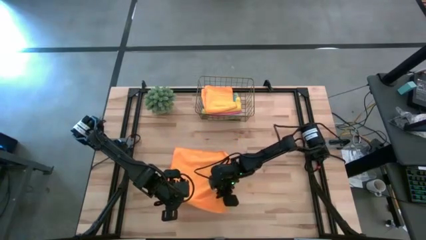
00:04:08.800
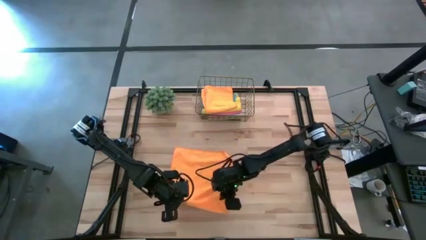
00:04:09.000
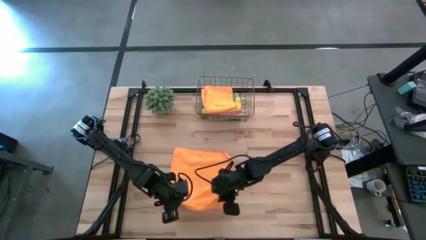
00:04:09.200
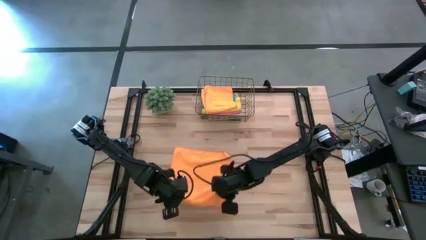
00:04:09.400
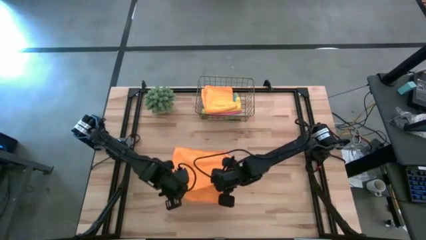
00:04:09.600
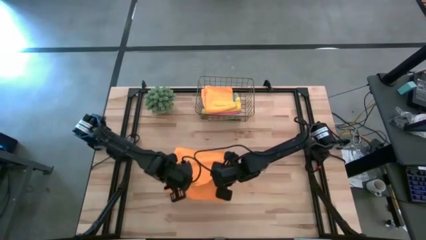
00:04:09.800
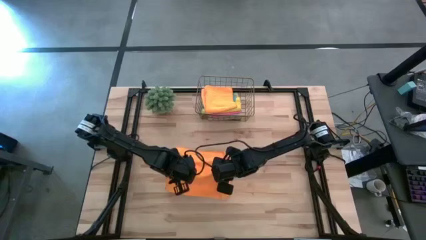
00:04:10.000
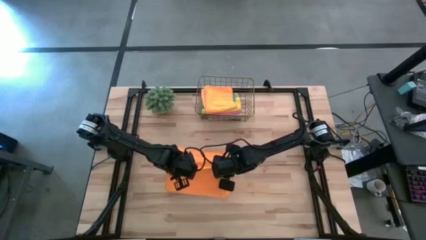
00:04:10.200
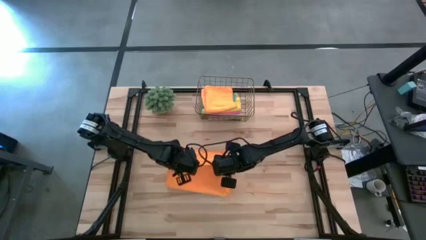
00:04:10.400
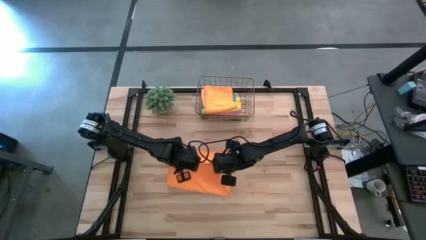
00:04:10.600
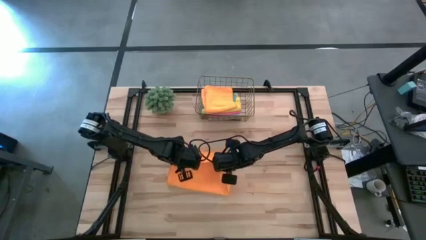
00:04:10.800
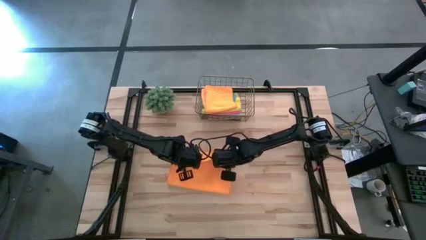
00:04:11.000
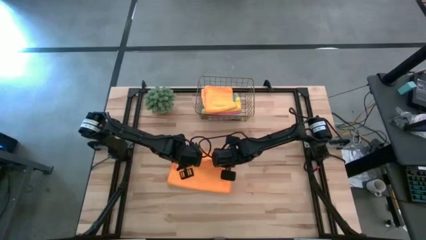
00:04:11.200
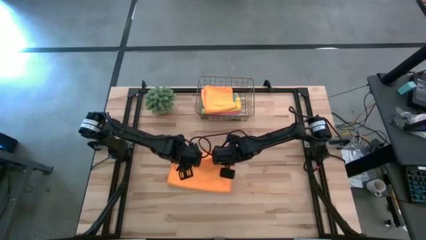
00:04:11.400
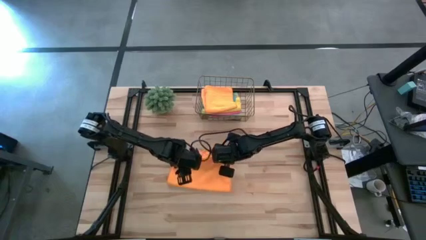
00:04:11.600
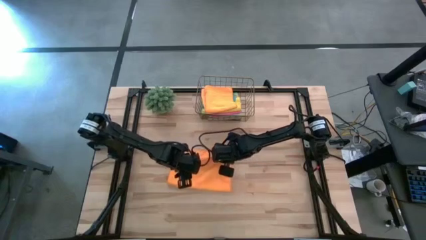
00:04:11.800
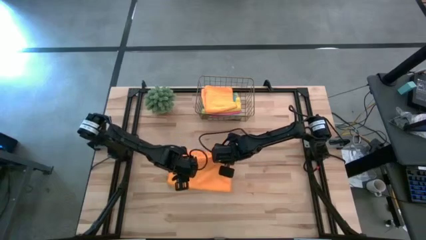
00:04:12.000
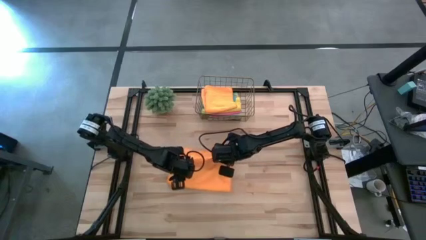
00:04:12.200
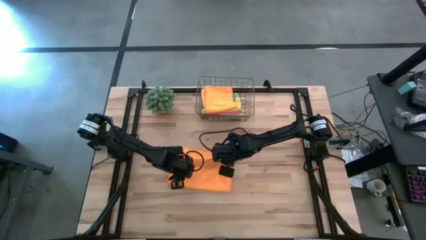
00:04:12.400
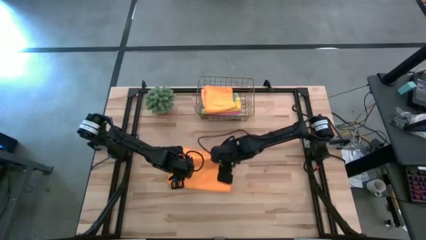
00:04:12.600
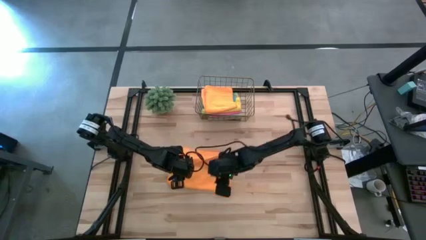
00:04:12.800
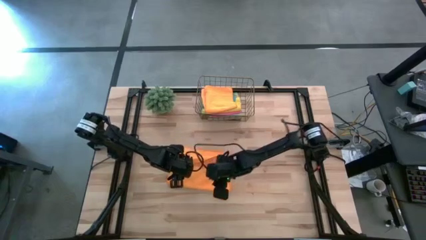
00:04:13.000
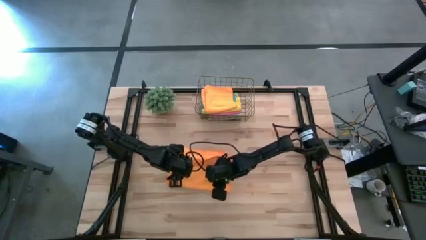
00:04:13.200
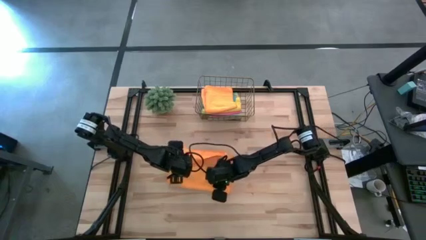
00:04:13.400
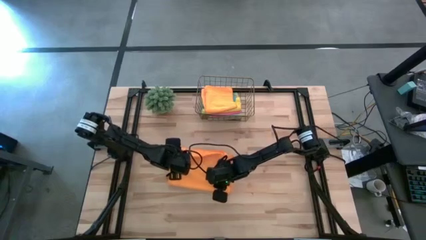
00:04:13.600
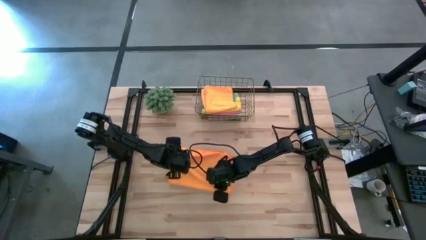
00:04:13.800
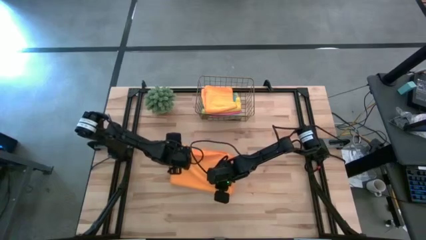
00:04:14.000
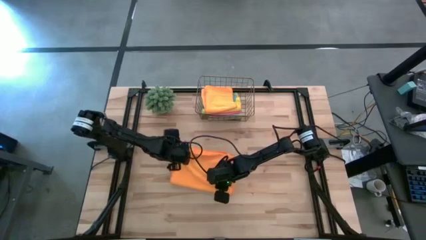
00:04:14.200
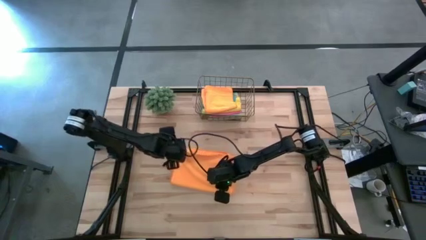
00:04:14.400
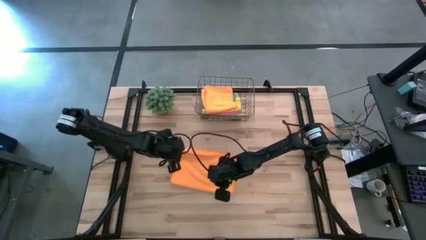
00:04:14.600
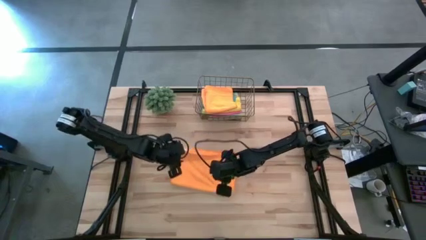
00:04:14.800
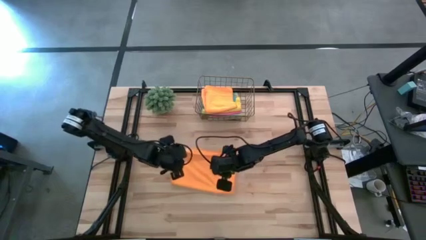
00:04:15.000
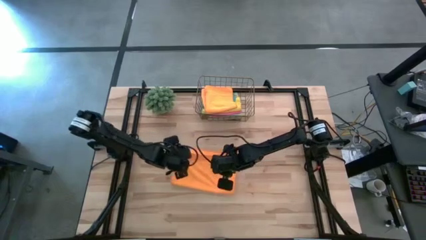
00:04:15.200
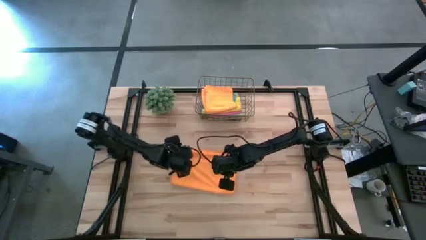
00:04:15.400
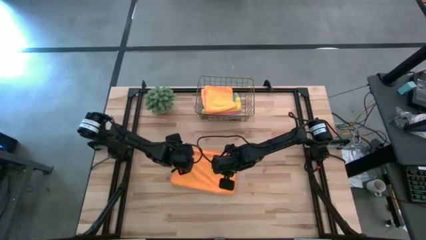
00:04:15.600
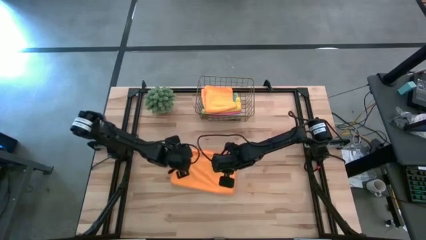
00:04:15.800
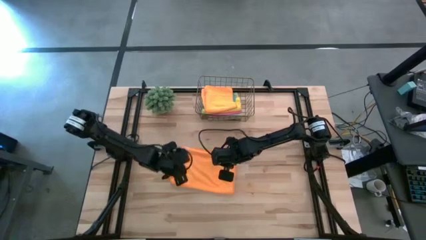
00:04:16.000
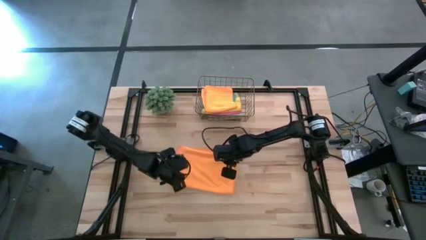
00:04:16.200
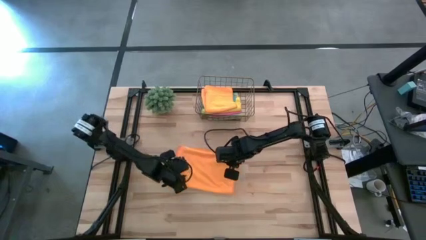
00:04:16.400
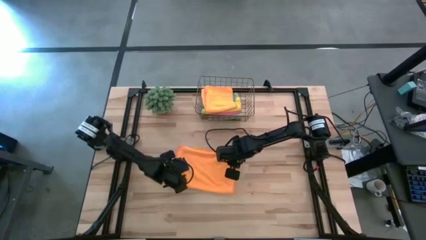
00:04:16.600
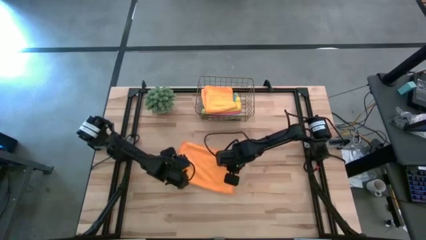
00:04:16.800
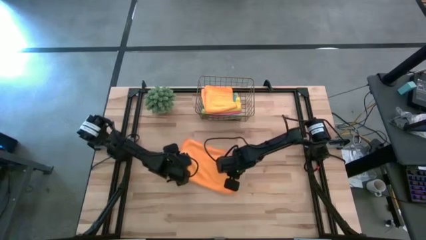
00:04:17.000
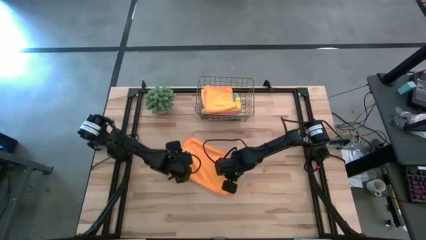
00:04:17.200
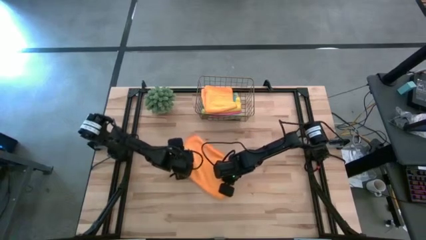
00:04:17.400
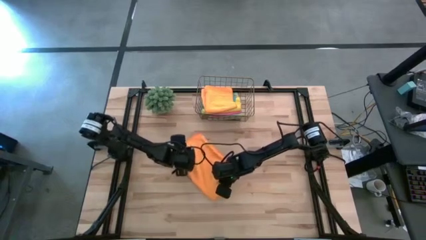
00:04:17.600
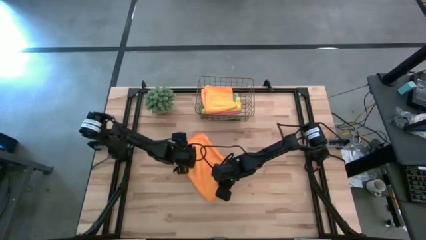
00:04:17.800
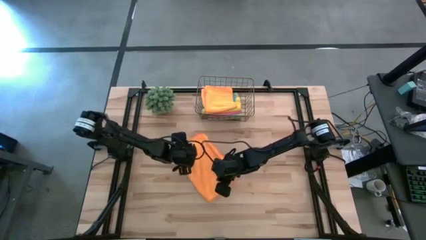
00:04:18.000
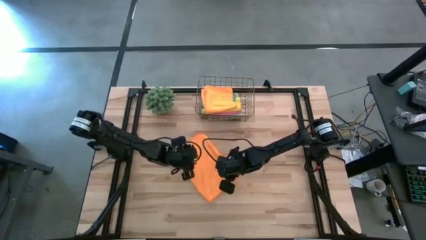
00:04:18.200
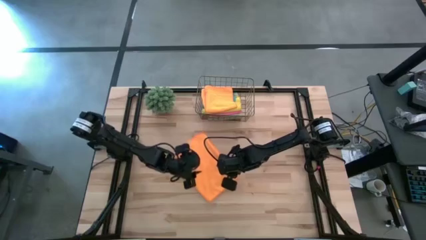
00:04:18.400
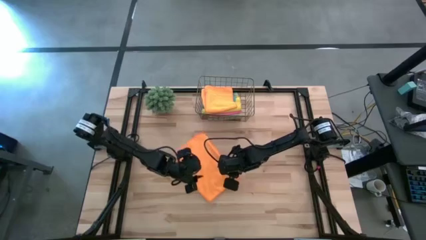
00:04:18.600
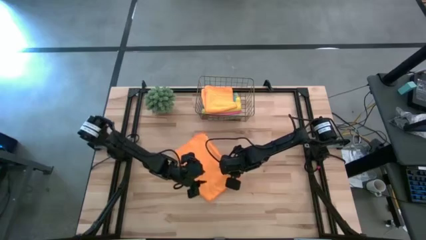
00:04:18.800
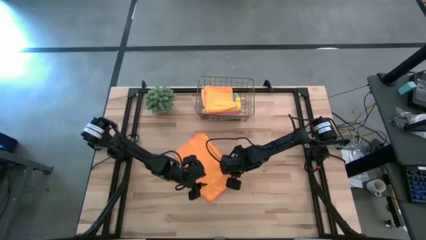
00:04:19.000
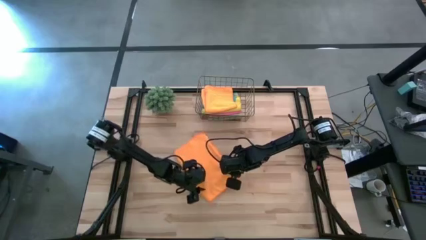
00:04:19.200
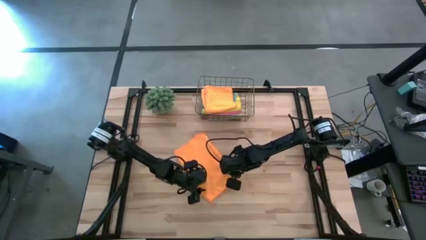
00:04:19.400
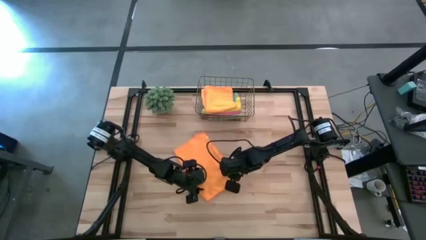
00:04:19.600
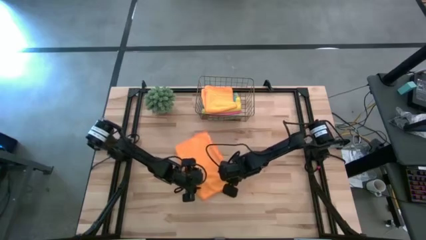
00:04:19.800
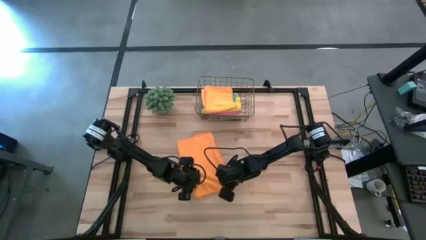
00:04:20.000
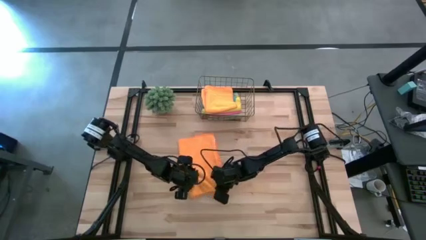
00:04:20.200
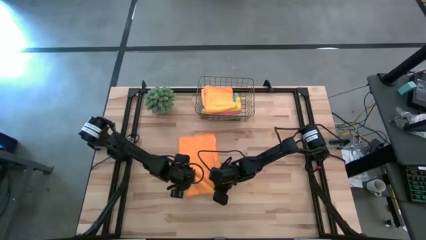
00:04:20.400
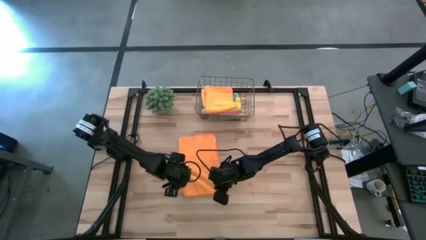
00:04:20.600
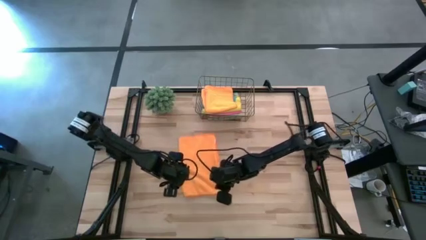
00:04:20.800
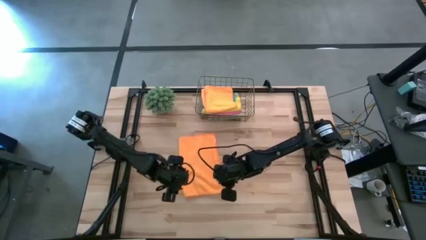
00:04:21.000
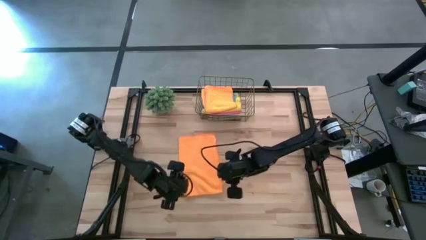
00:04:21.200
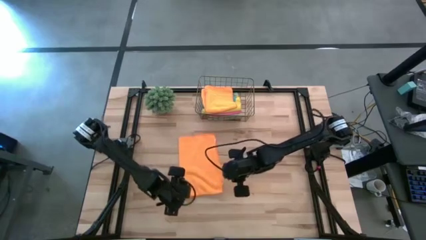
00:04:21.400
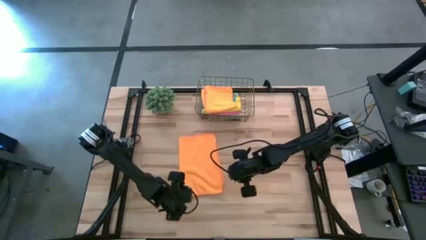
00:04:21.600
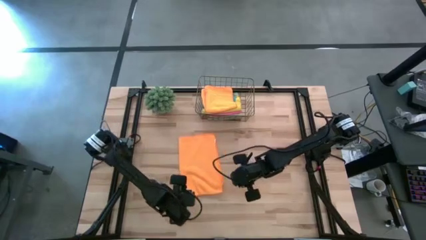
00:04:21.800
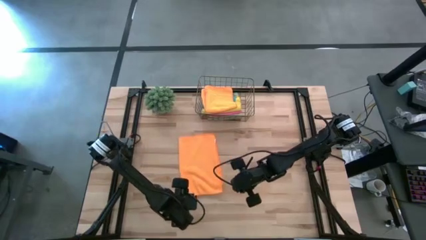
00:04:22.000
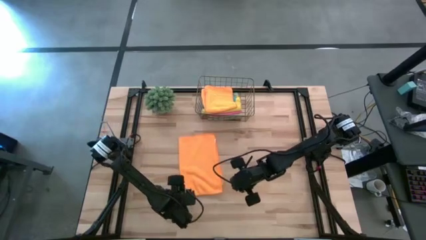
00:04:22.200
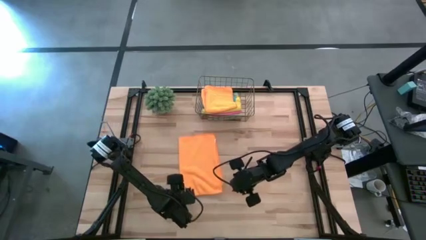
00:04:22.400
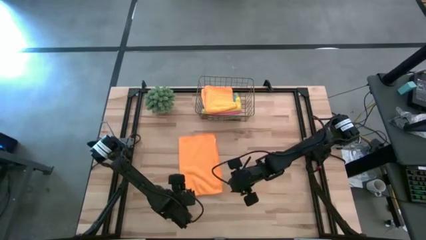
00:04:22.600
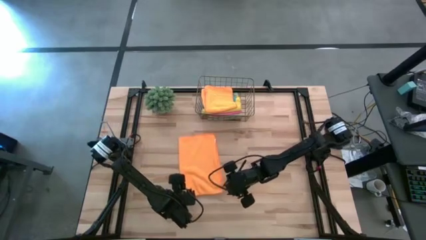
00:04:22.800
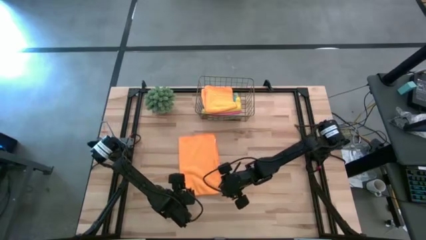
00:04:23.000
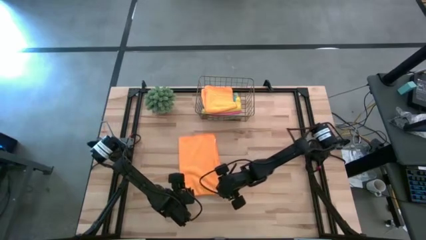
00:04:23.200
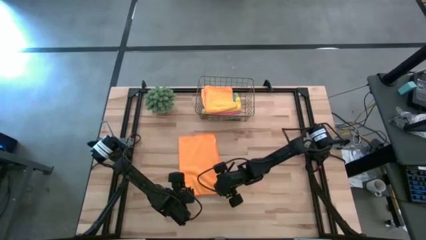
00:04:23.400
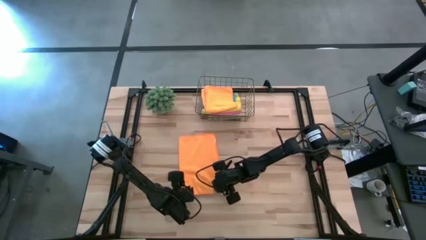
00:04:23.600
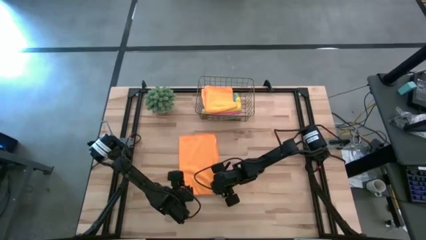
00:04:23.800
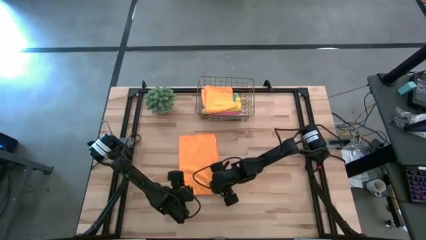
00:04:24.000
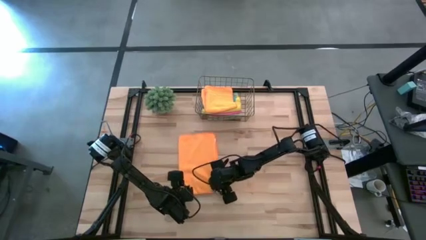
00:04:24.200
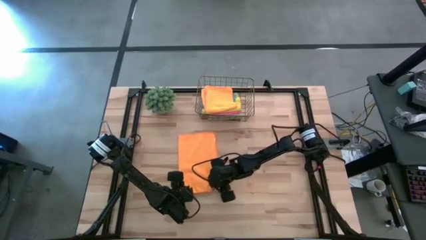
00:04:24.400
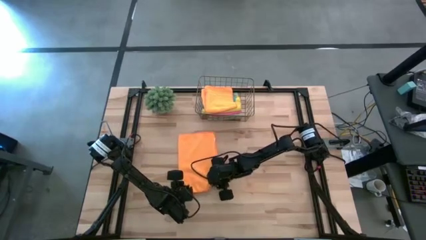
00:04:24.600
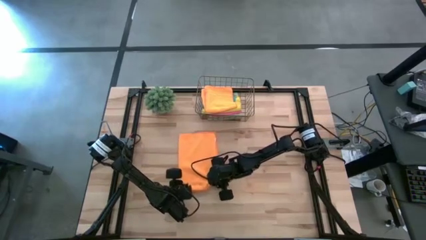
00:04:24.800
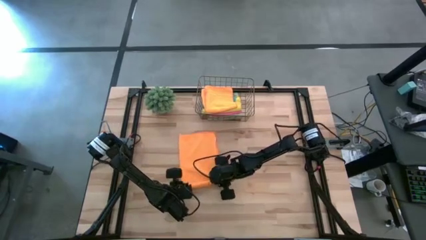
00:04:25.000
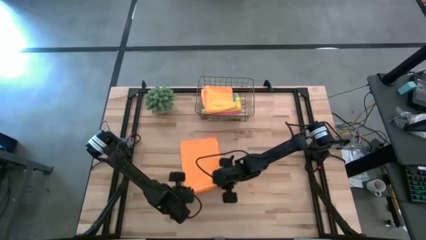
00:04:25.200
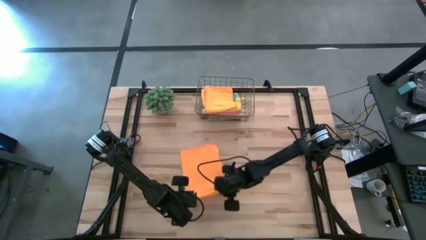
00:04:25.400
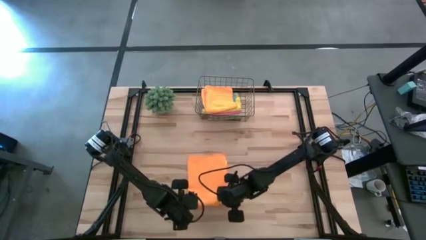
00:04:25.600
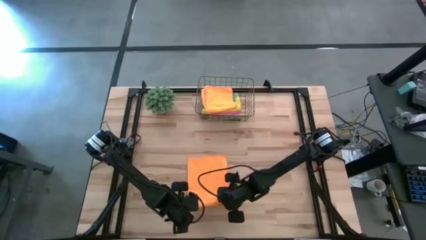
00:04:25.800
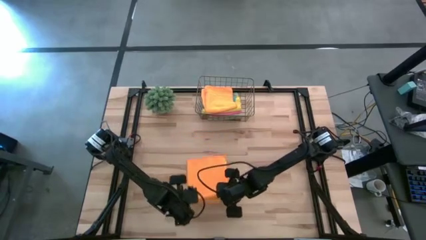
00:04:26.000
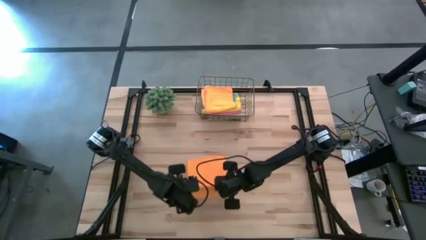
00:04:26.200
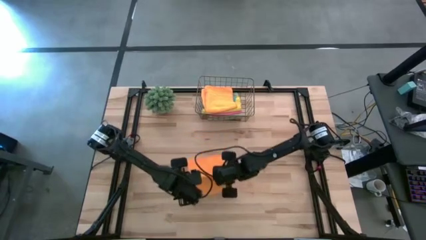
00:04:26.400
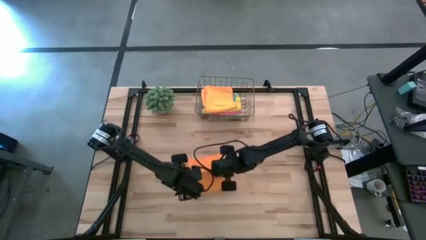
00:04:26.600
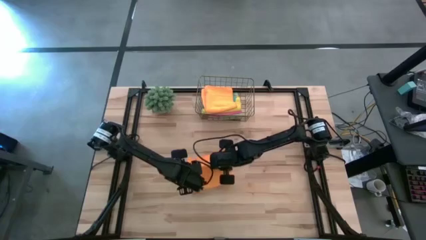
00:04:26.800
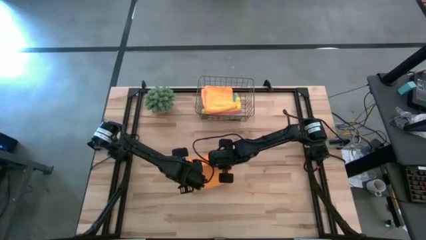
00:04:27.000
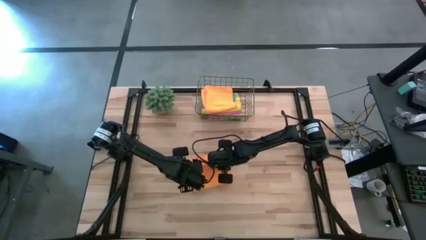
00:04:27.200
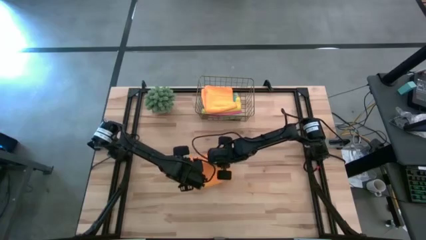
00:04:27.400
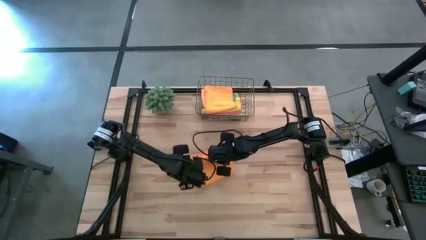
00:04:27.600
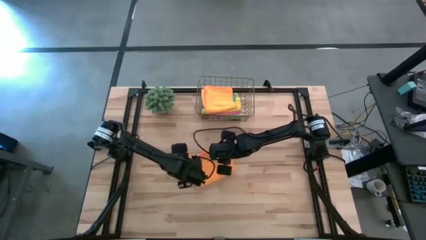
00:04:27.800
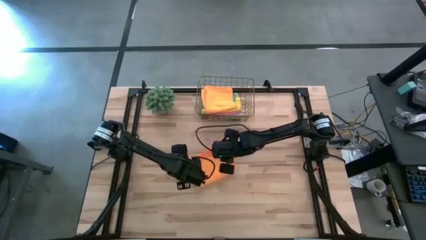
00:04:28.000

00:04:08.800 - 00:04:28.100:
Task: Fold microfiber towels
Fold the orange towel
